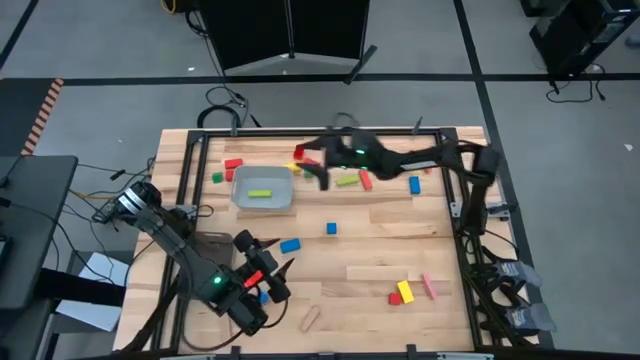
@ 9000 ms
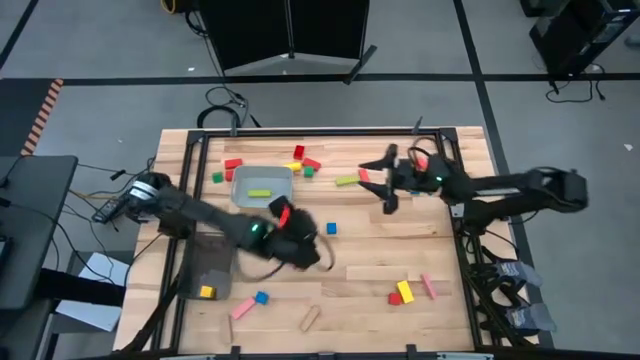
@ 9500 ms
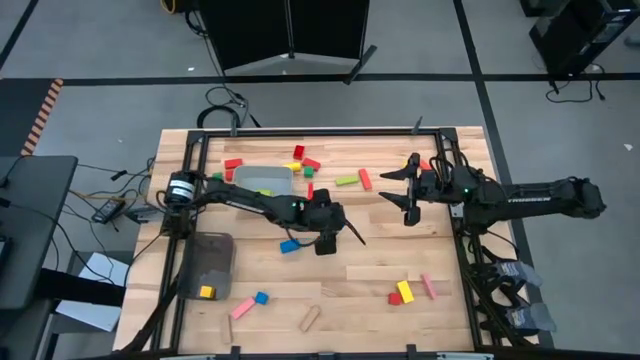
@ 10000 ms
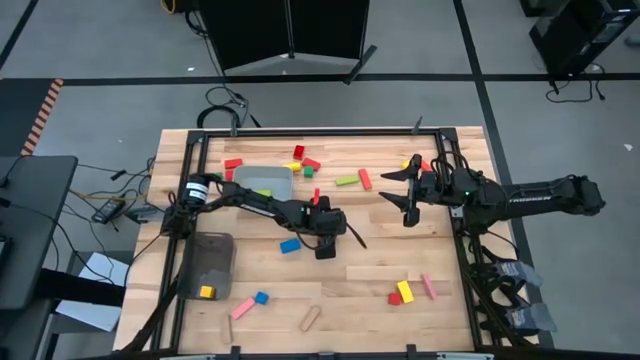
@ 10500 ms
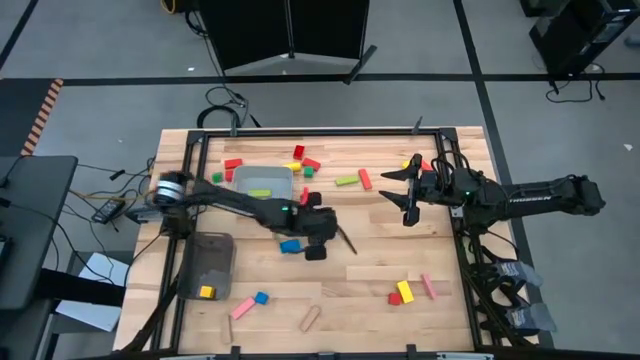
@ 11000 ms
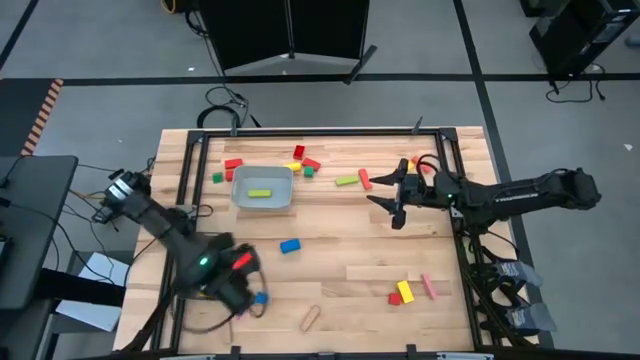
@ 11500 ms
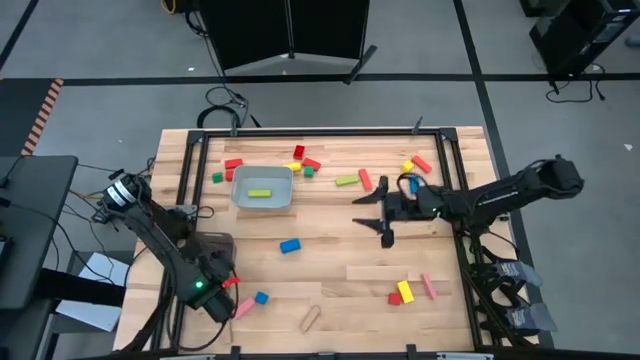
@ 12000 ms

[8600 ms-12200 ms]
Task: Sort blocks by size
Put the blue square block into the black bin

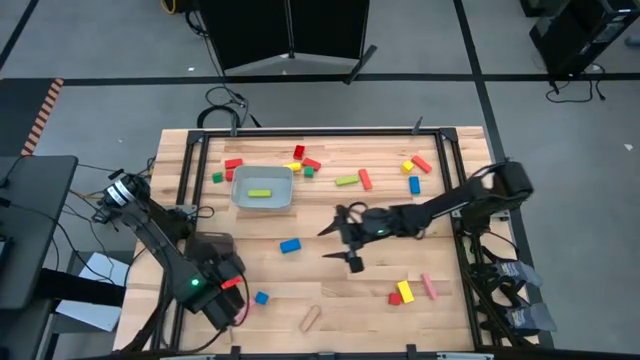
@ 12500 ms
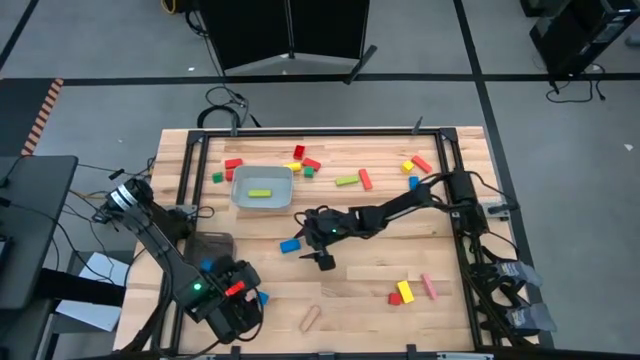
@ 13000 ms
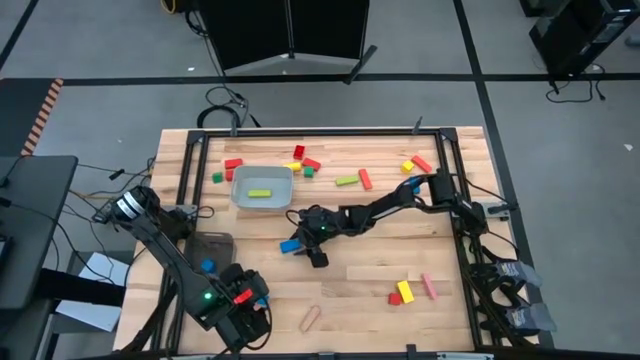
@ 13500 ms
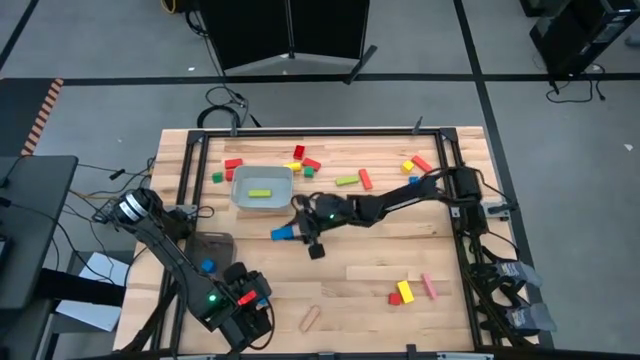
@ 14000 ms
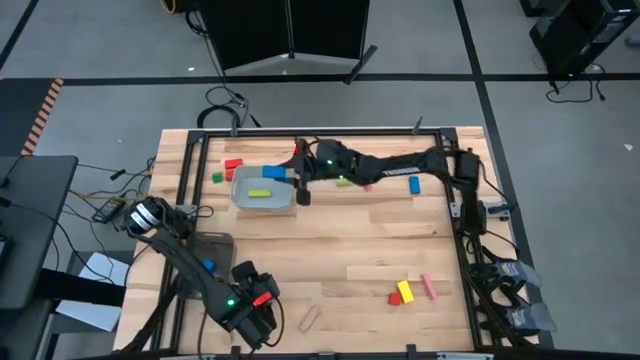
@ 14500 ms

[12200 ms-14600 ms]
Put the blue rectangular block into the gray bin

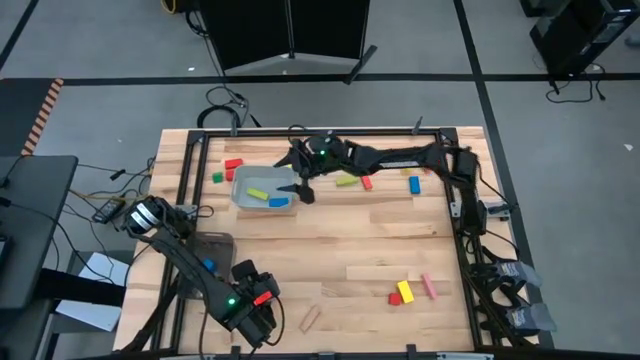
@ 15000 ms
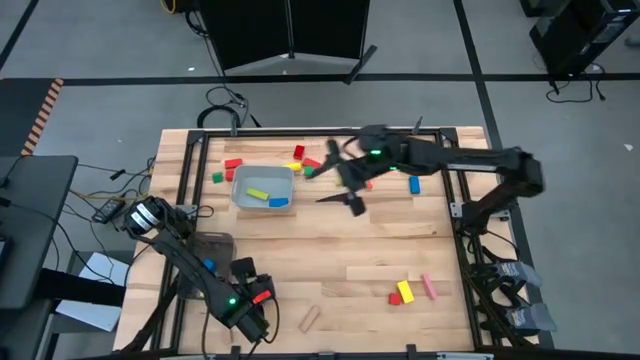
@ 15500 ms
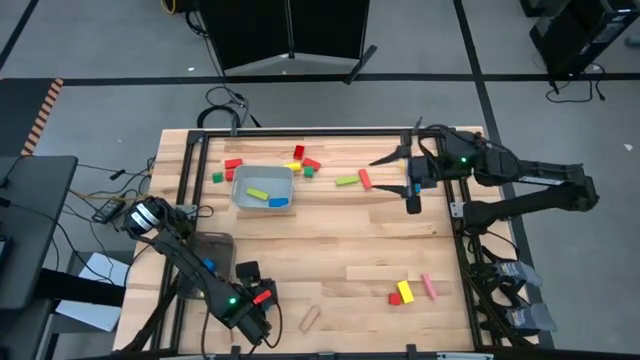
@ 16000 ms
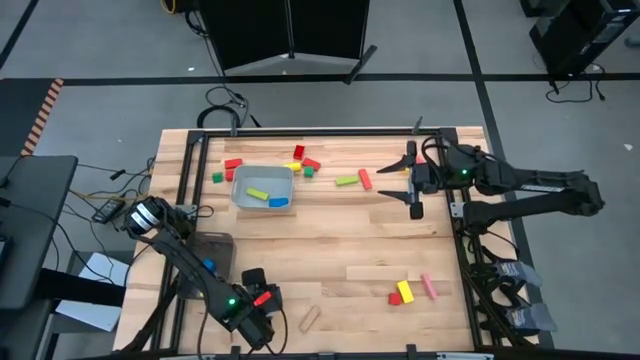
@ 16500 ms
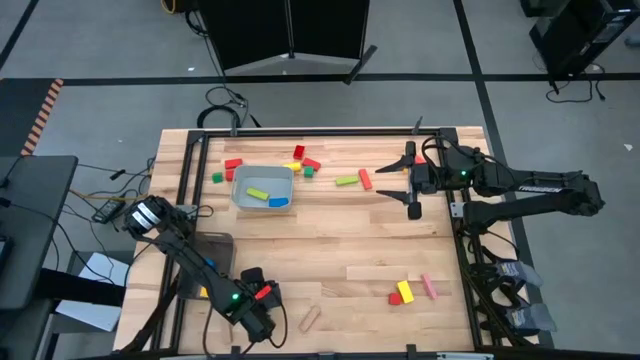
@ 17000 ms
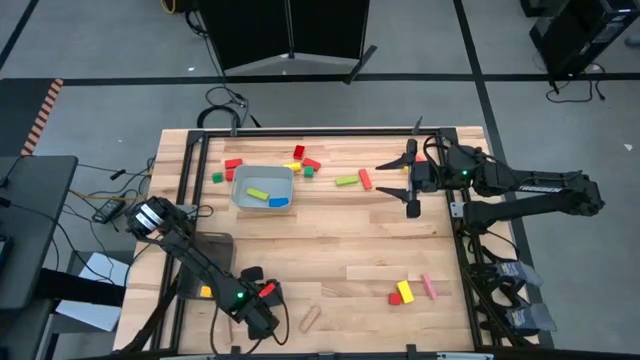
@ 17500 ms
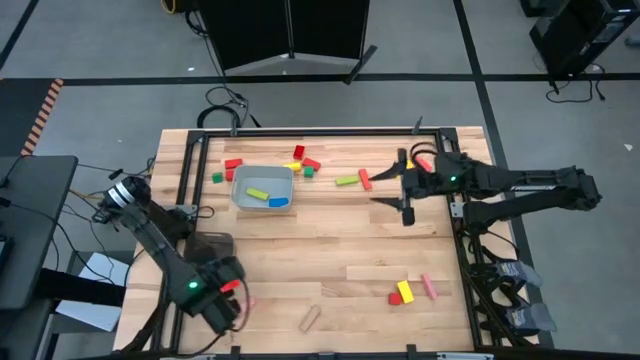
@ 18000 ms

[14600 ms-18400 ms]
Put the blue square block into the black bin

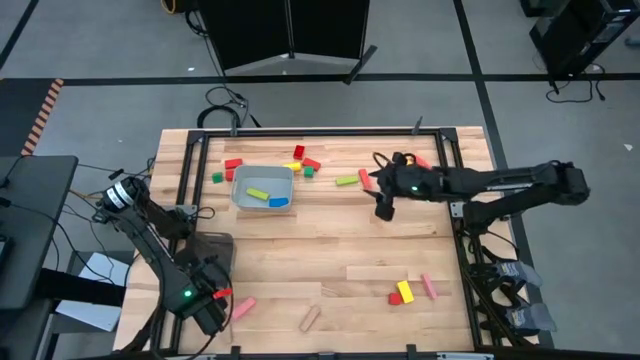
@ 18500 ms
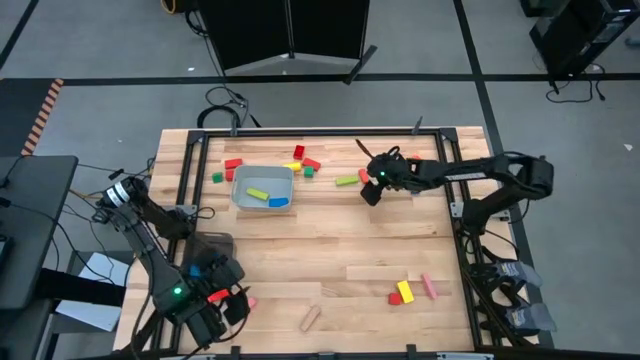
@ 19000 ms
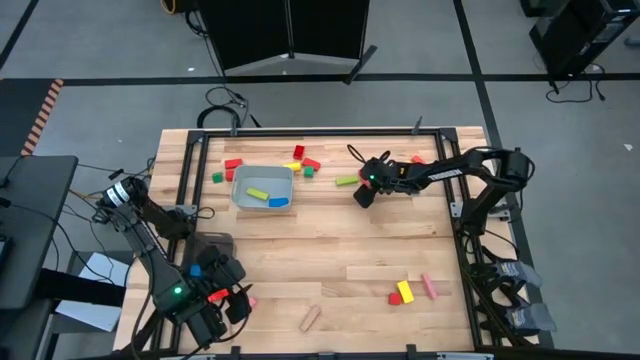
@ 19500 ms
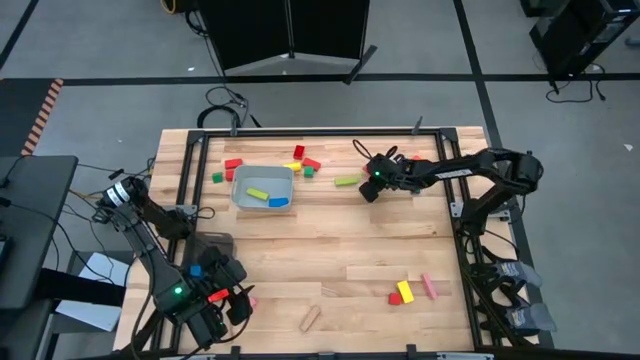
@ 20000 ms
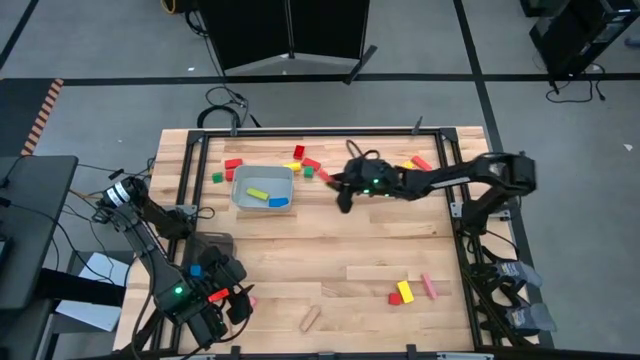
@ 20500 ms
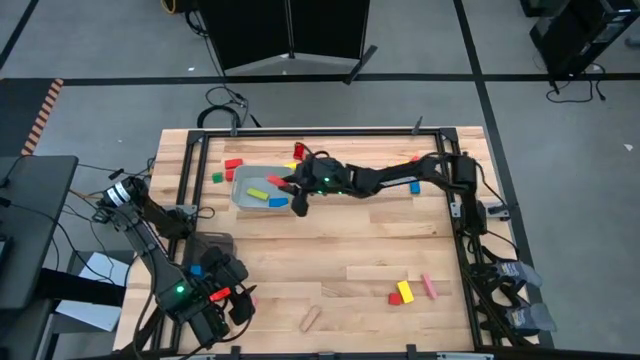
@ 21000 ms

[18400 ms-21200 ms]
Put the orange rectangular block into the gray bin

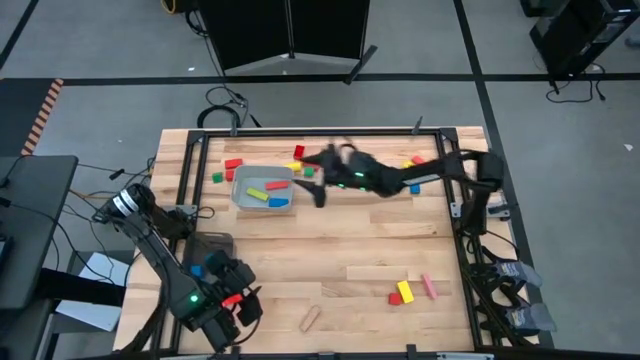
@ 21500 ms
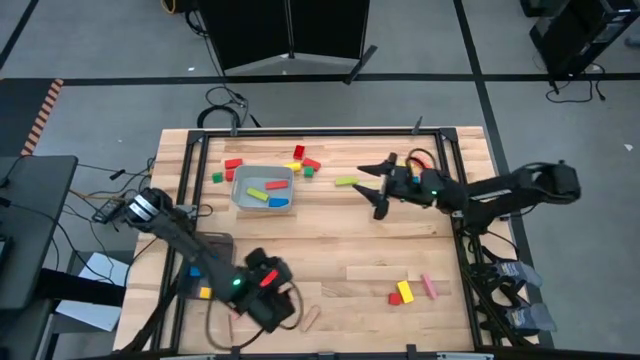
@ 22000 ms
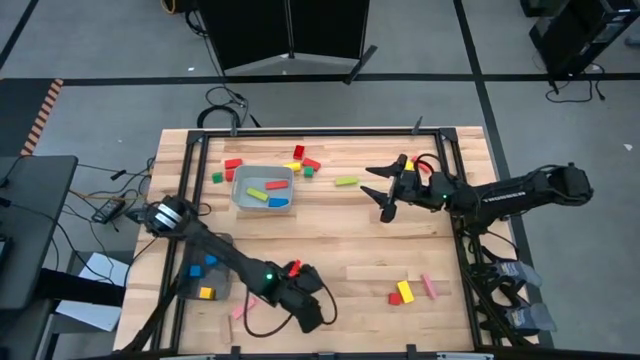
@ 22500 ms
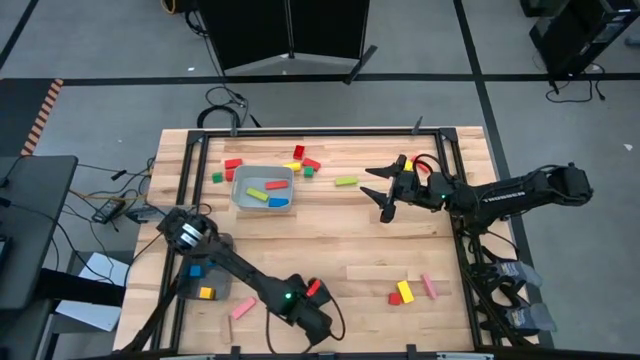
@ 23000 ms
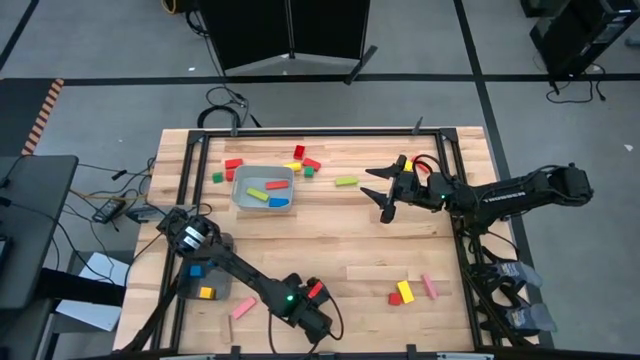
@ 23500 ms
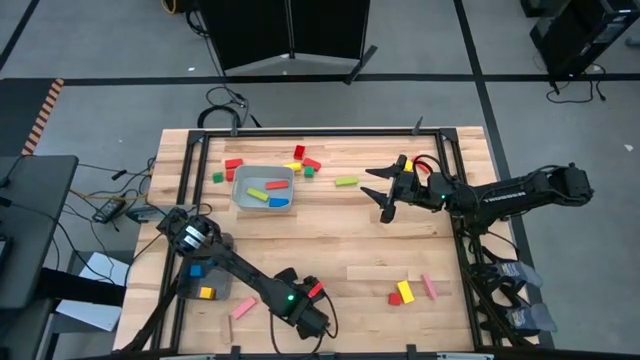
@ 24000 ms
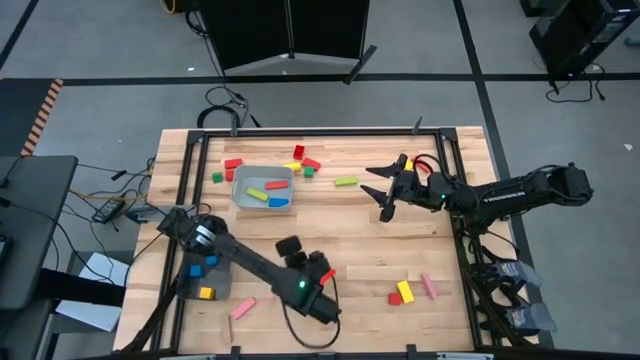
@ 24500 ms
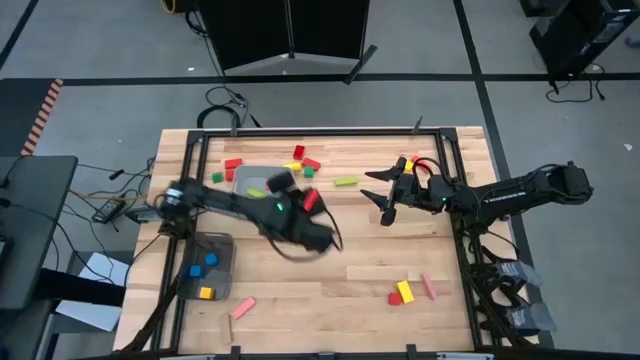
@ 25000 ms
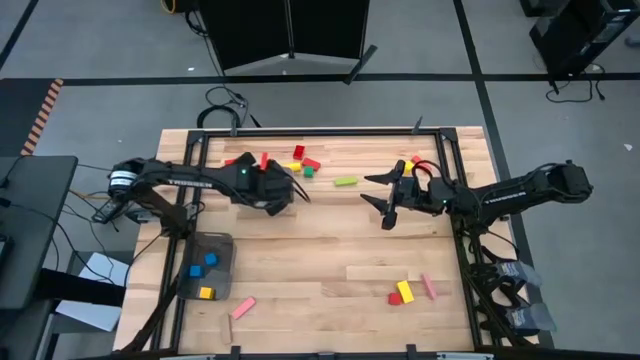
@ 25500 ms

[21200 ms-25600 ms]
Put the brown rectangular block into the gray bin

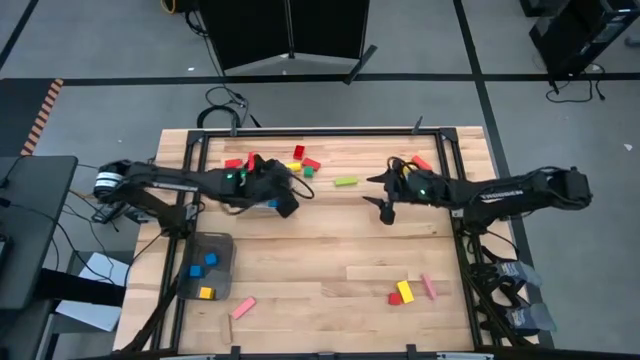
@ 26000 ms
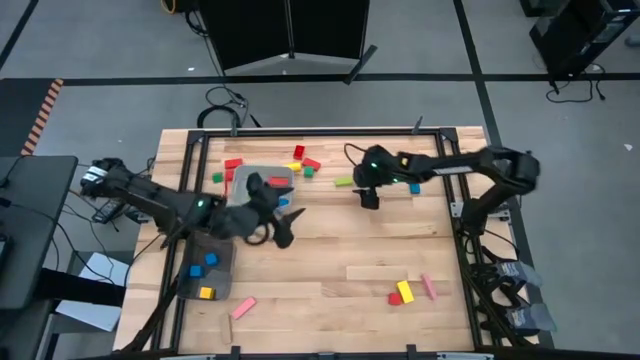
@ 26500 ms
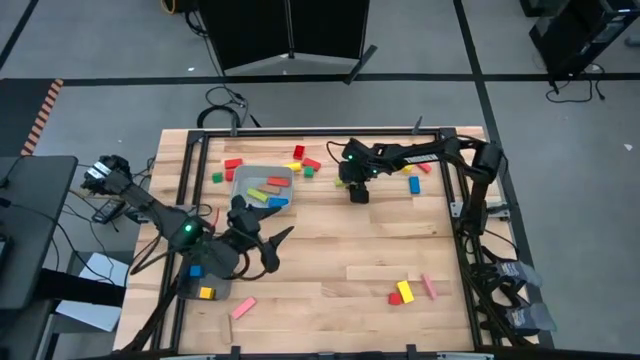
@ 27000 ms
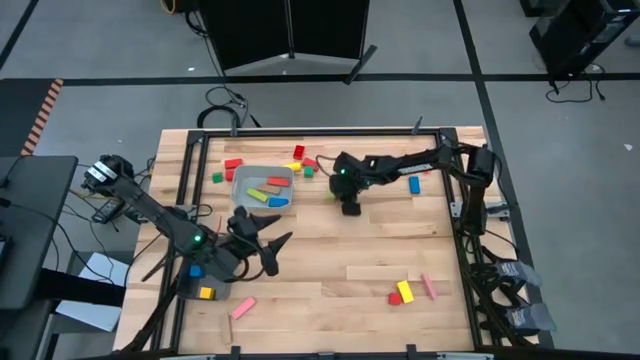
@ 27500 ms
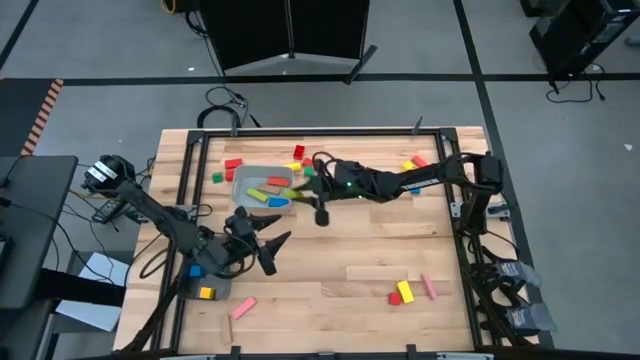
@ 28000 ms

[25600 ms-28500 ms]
Put the apple green rectangular block into the gray bin

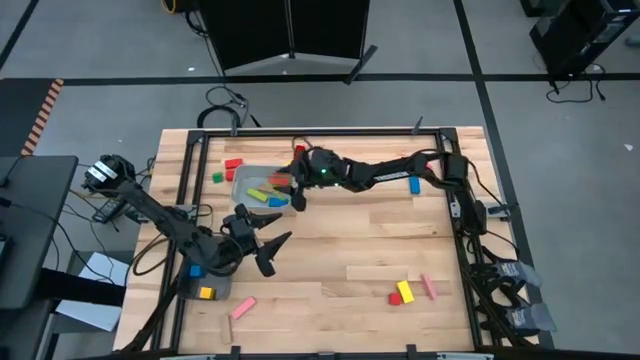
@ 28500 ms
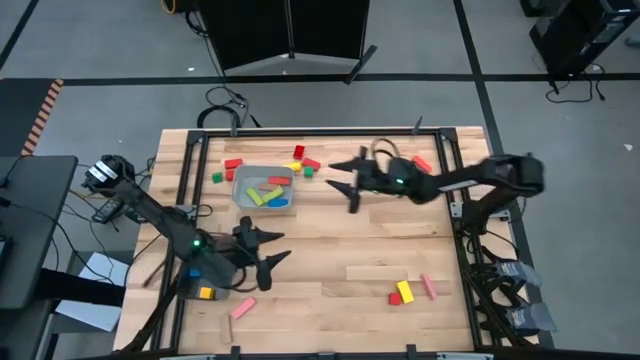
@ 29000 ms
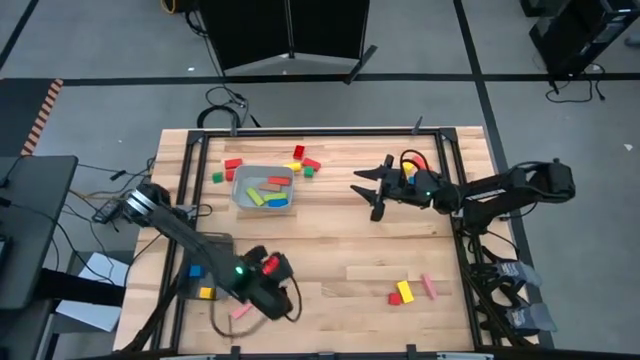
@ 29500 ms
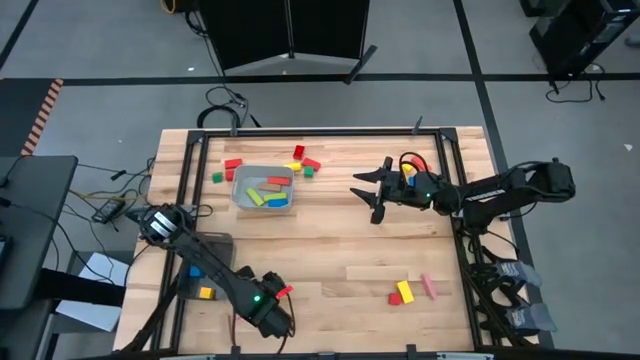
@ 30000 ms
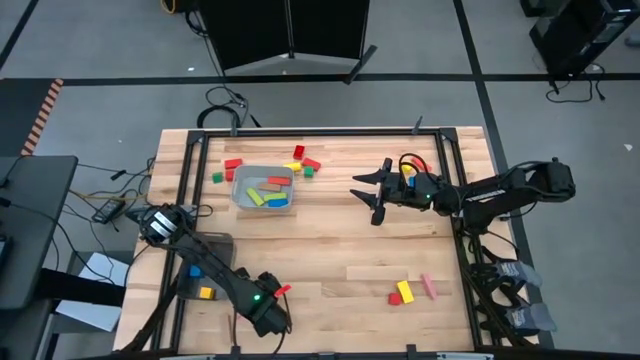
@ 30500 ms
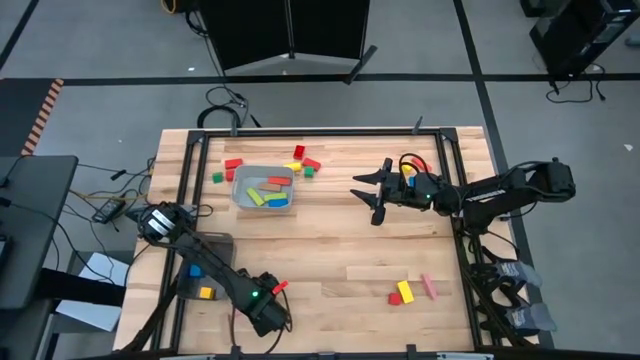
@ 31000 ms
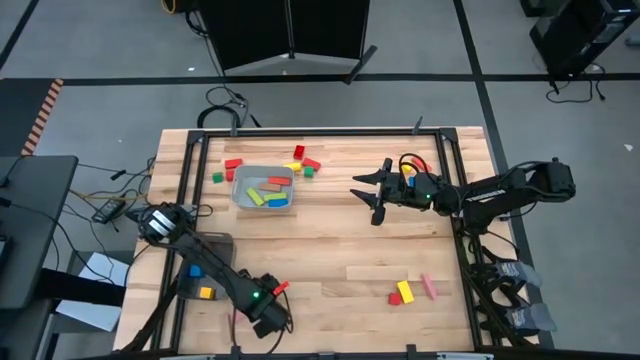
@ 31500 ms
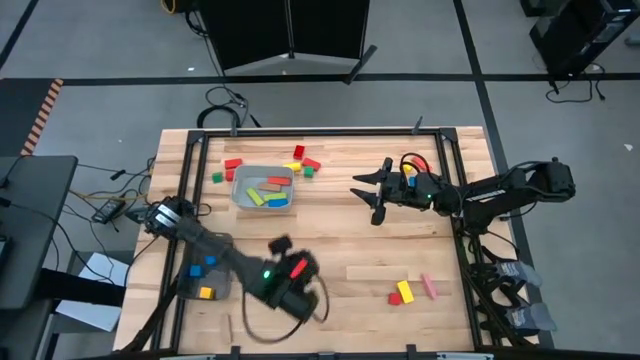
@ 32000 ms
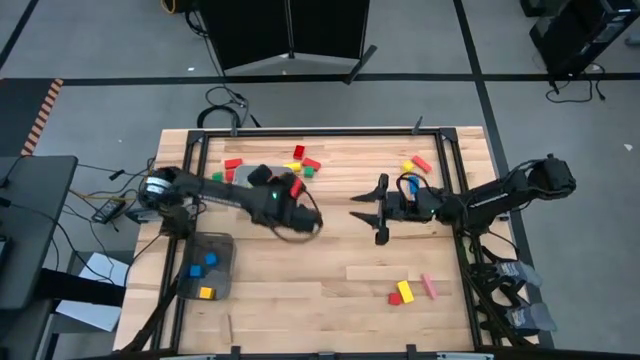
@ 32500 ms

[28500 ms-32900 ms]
Put the pink rectangular block into the gray bin
